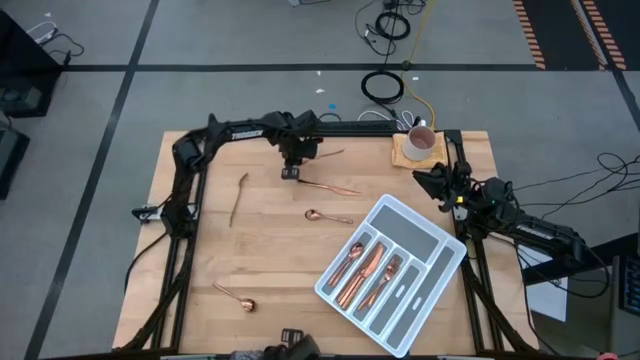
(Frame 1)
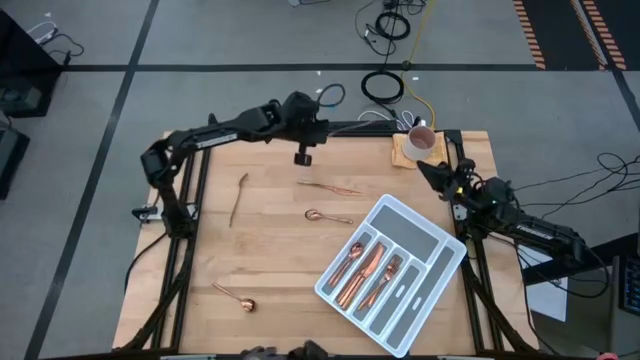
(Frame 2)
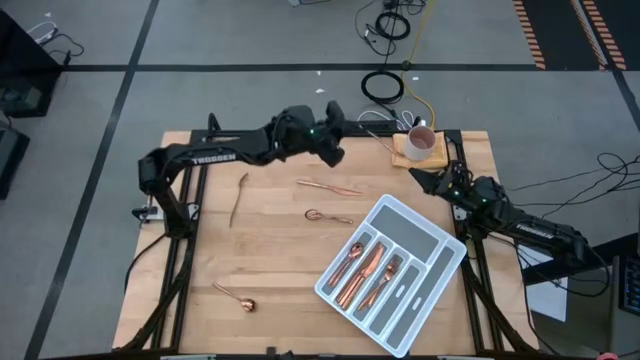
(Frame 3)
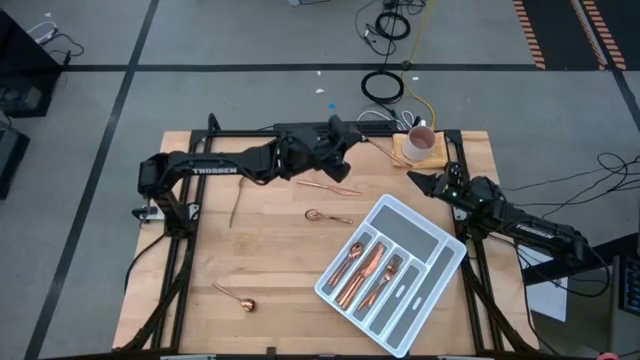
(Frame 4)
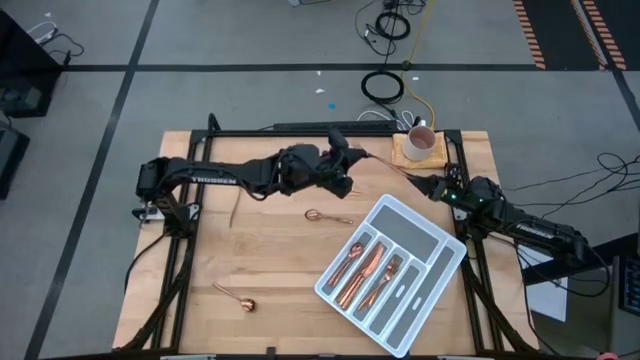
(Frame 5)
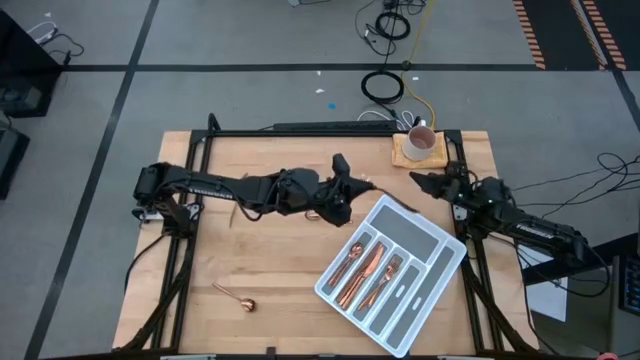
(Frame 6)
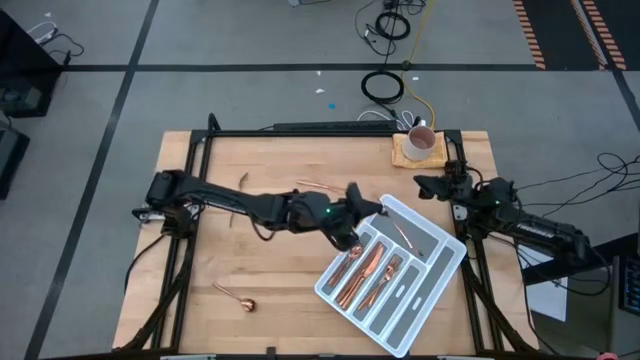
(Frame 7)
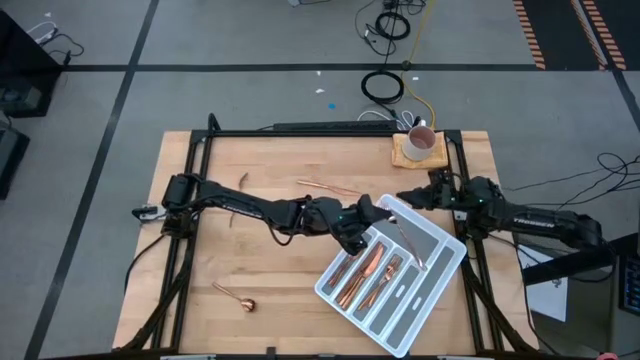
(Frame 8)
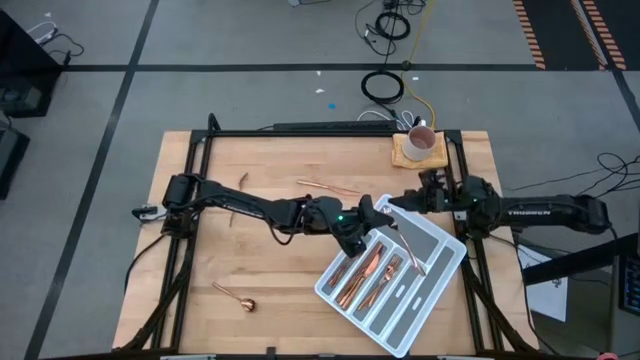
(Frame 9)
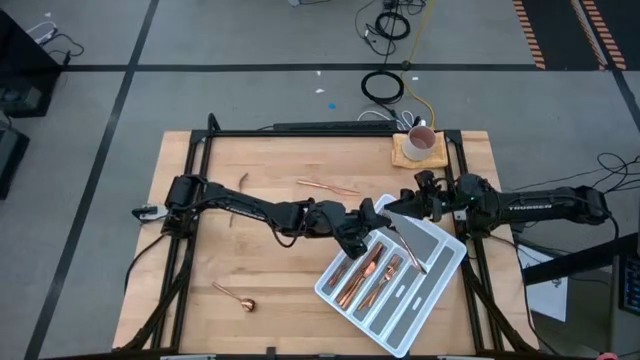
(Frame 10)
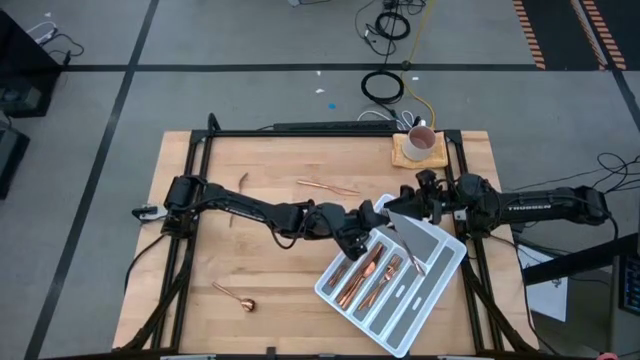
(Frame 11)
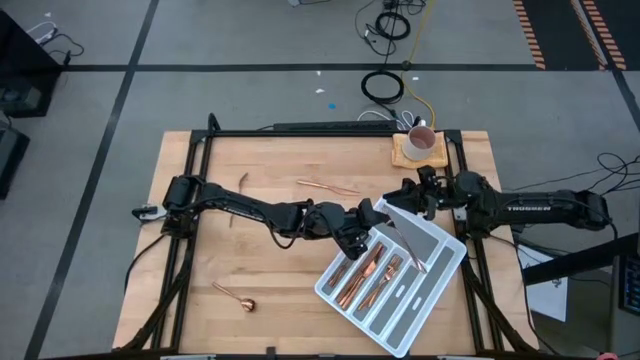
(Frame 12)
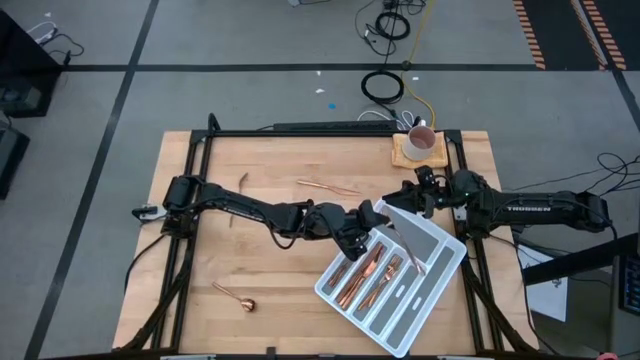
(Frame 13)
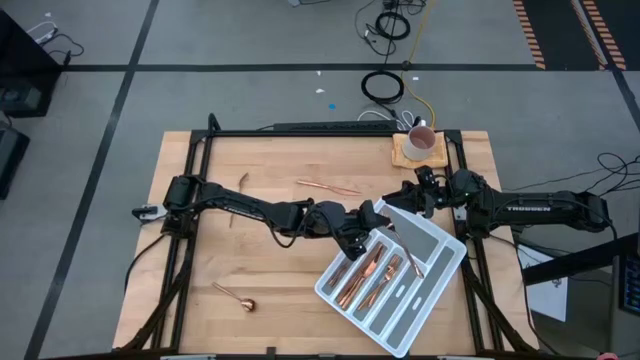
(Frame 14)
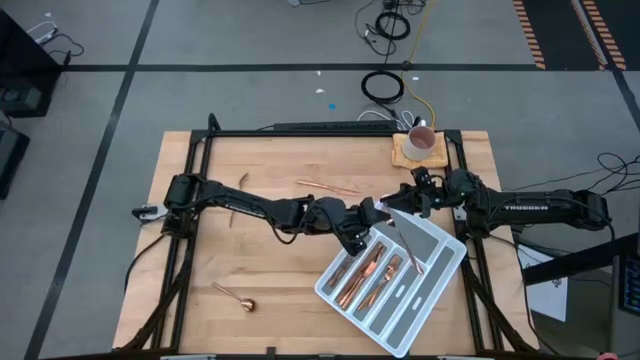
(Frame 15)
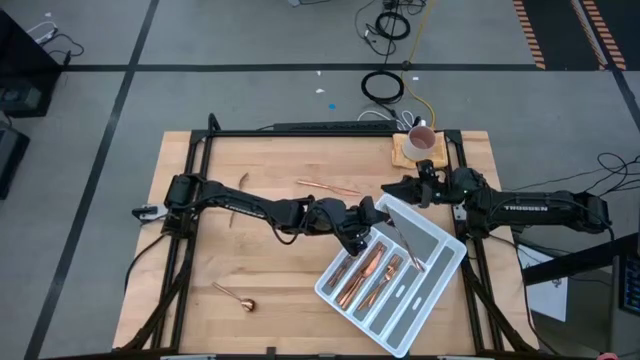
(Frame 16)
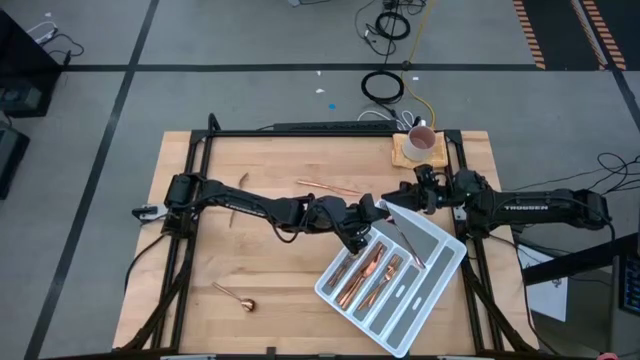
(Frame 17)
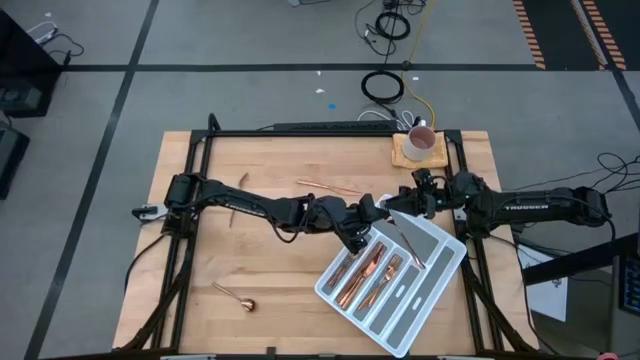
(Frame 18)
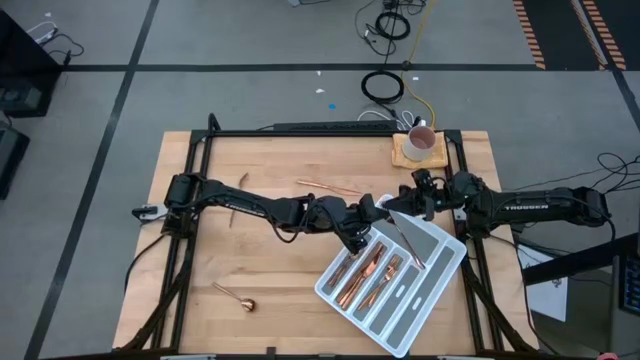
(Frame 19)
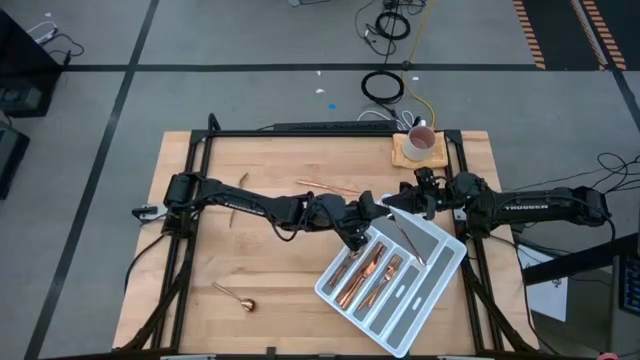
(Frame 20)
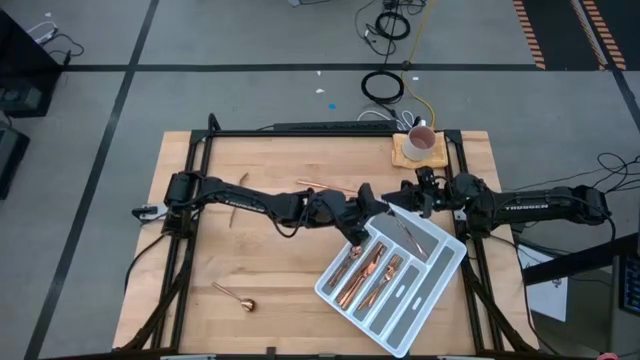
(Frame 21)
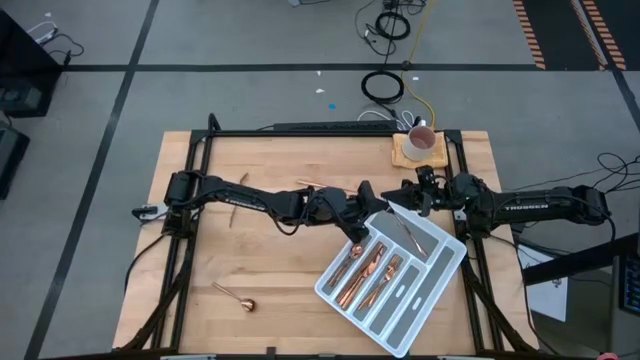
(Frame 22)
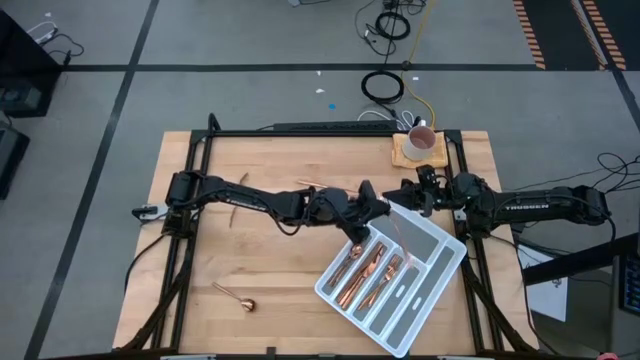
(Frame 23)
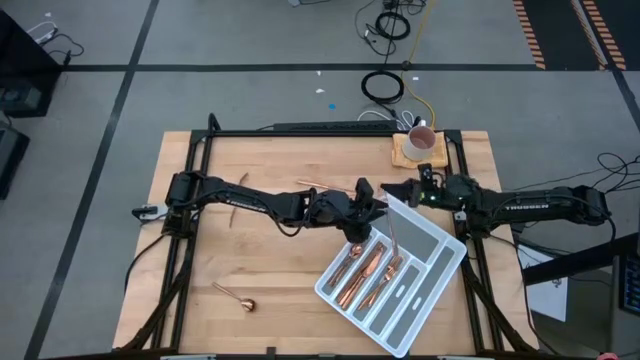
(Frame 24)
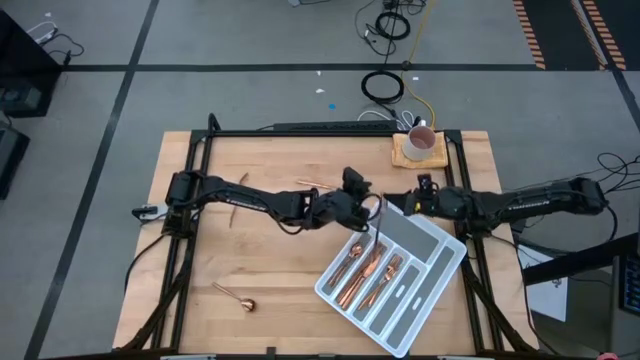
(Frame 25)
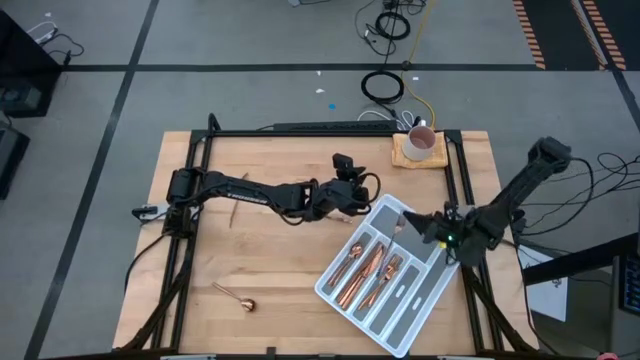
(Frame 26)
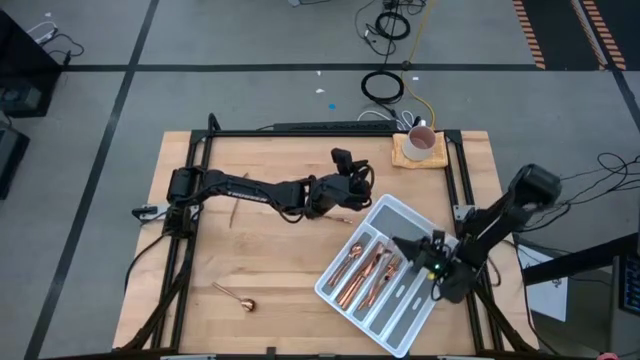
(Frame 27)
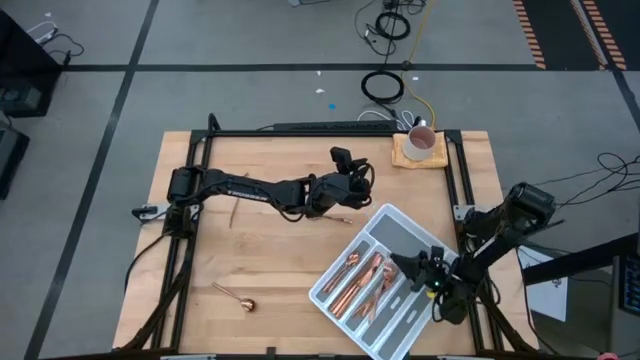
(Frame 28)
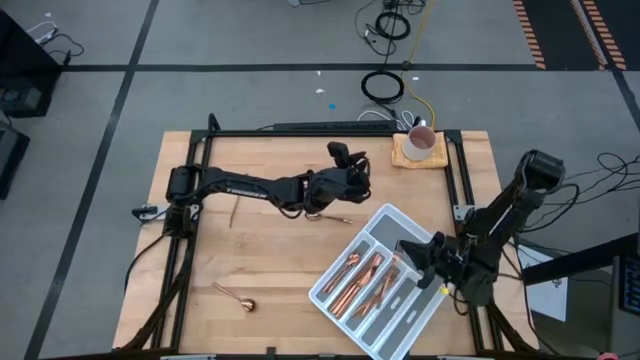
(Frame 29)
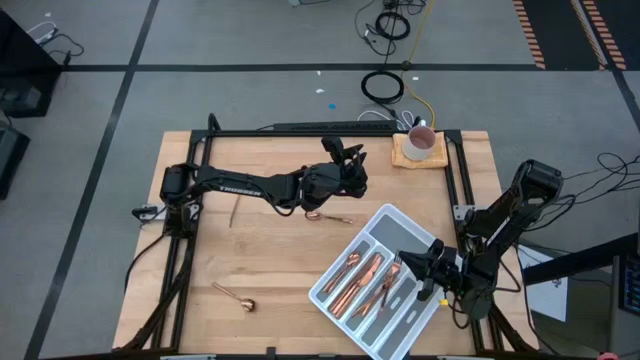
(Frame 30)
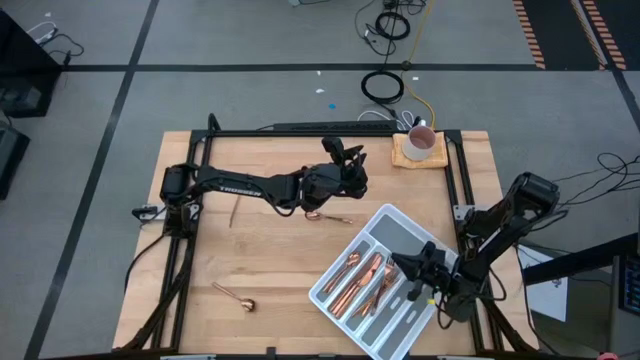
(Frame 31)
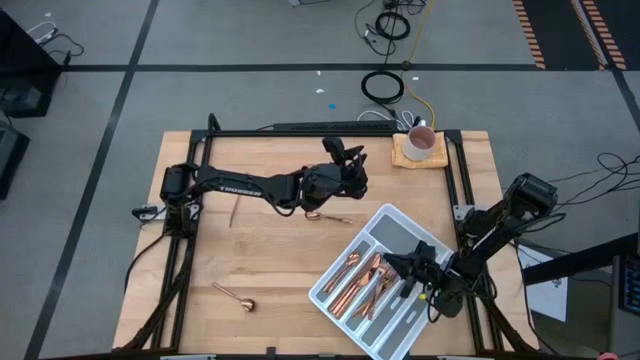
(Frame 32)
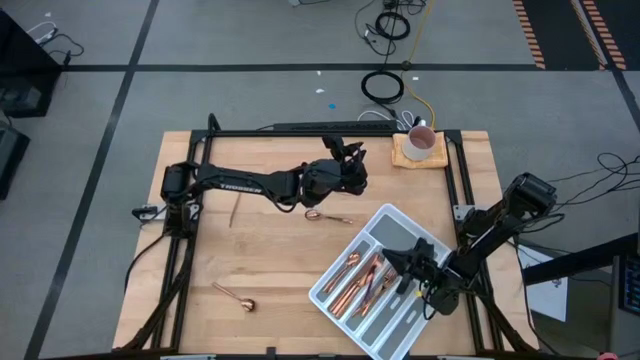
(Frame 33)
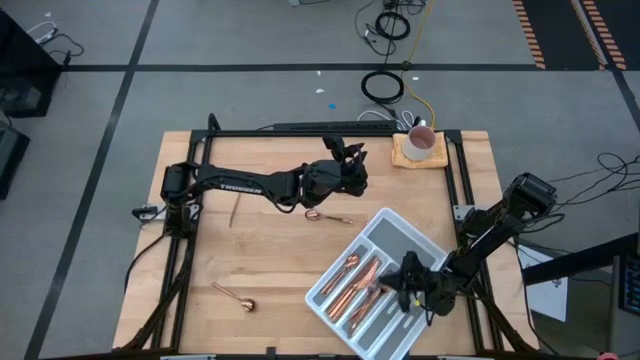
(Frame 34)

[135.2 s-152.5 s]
Task: Sort silverware
Put the gold fork into the cutlery tray with the other gold forks

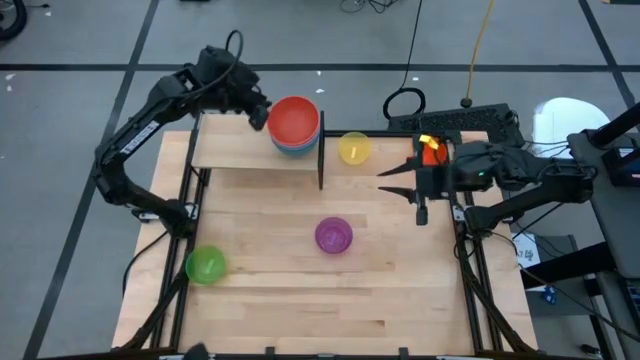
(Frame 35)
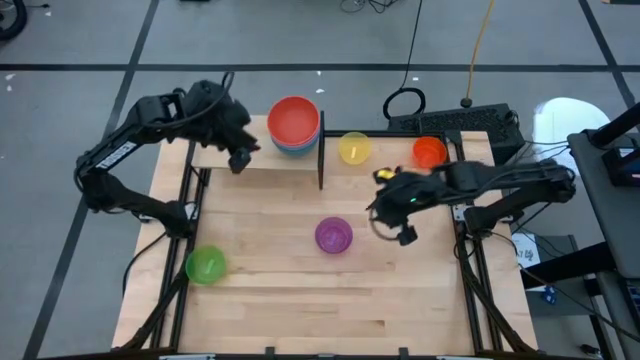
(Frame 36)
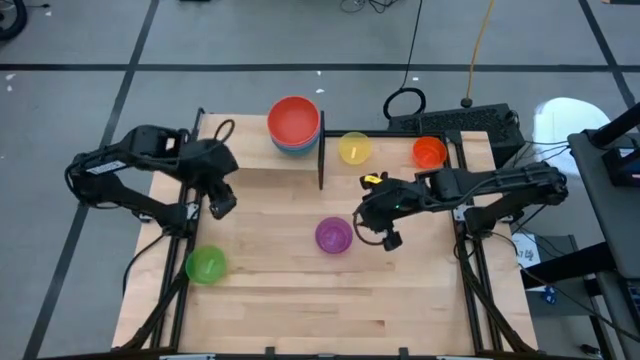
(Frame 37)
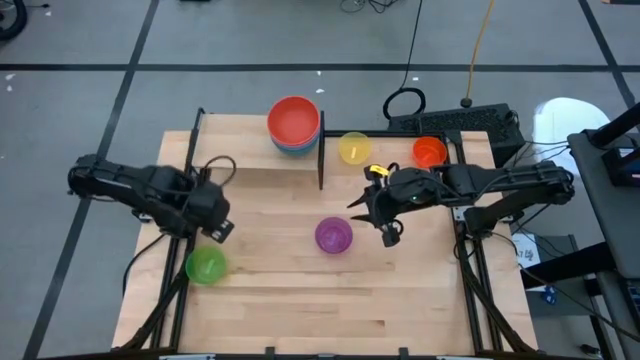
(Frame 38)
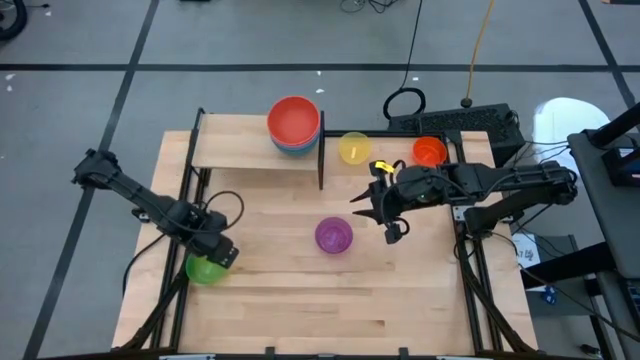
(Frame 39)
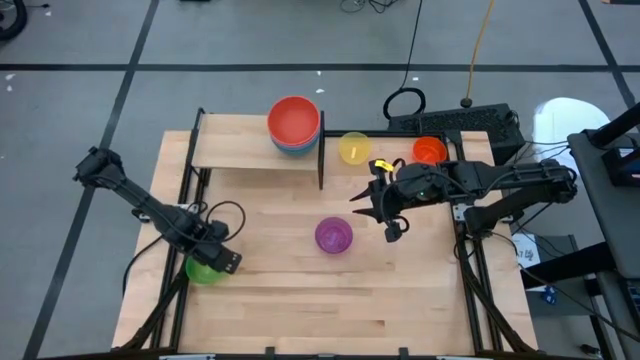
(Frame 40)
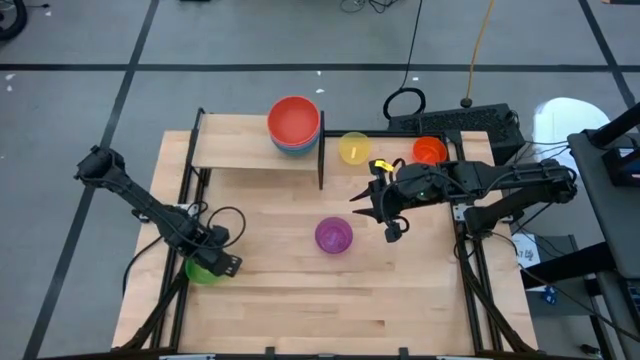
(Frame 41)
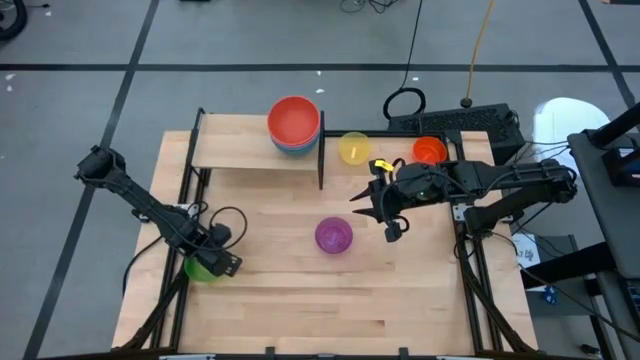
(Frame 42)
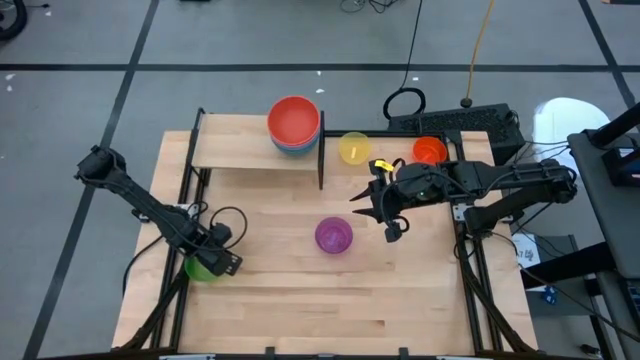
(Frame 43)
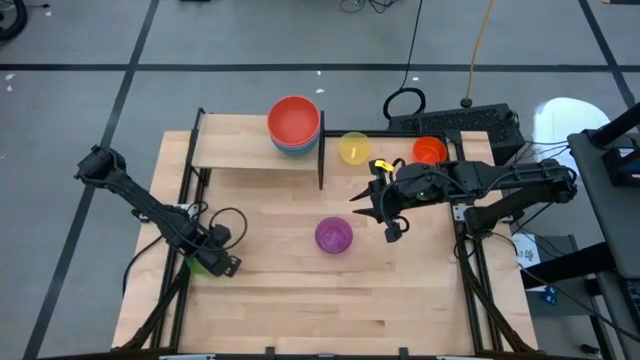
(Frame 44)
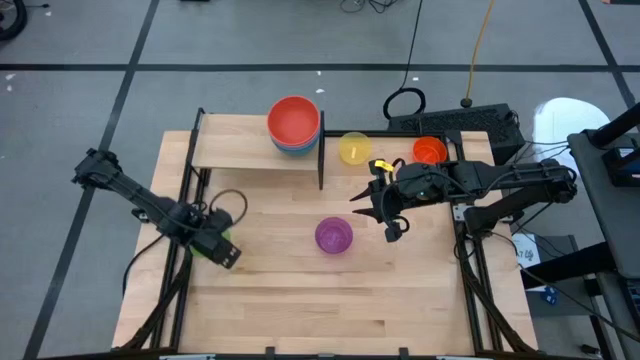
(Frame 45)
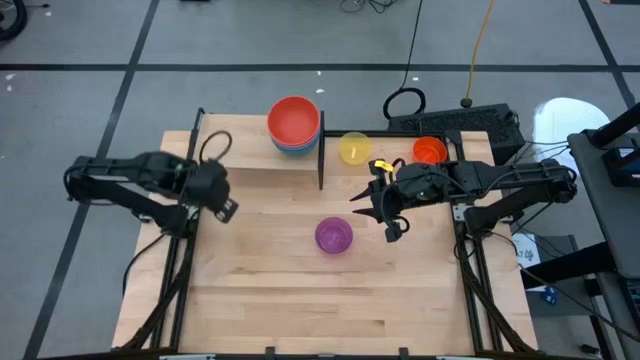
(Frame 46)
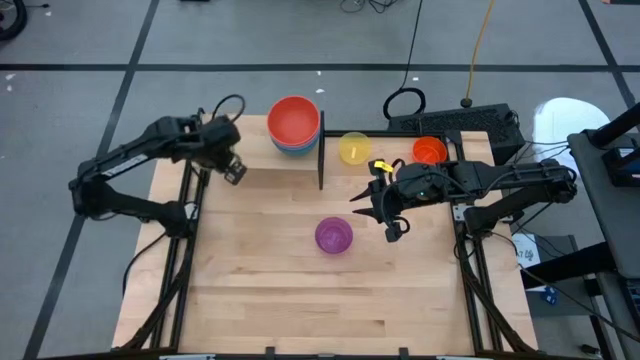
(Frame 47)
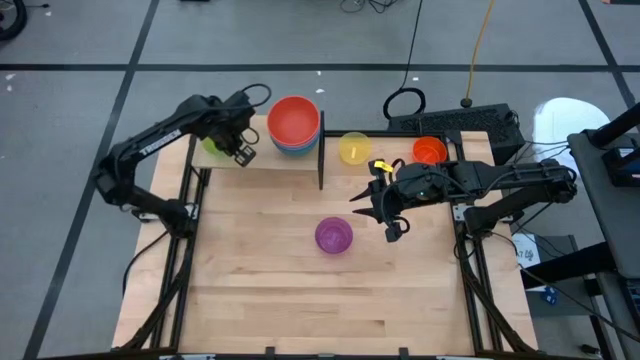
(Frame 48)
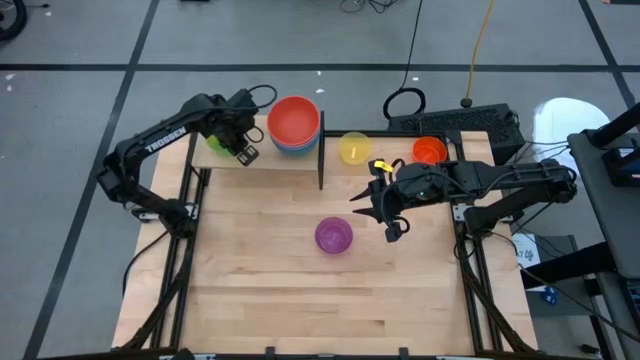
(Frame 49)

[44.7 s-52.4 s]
Task: Place and stack bowls onto a shelf
Put the green bowl on the shelf
